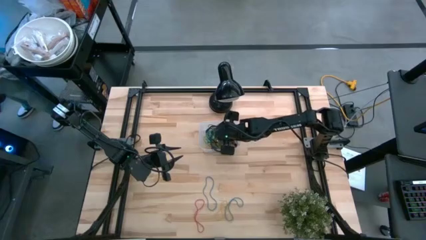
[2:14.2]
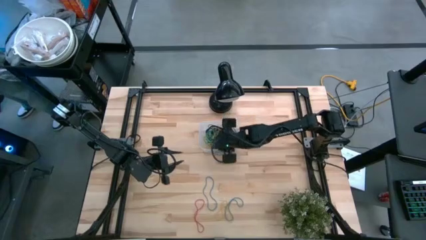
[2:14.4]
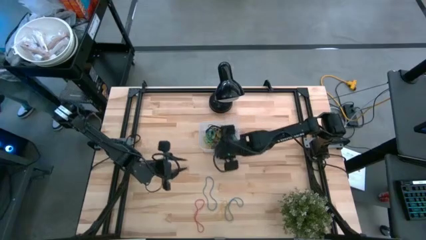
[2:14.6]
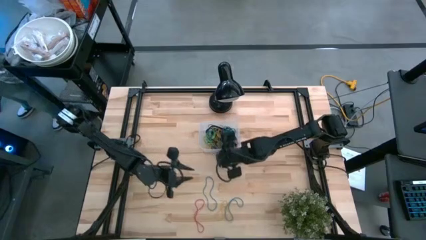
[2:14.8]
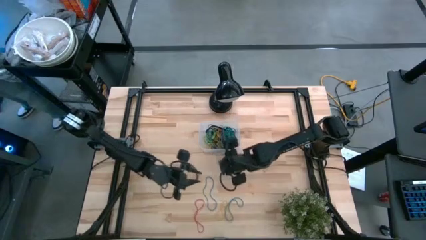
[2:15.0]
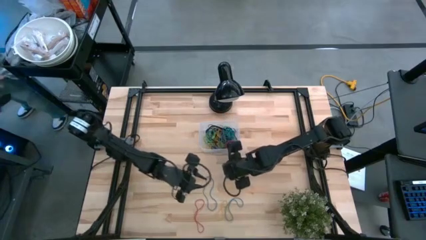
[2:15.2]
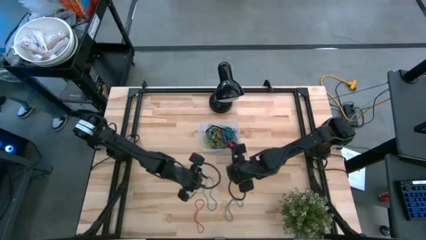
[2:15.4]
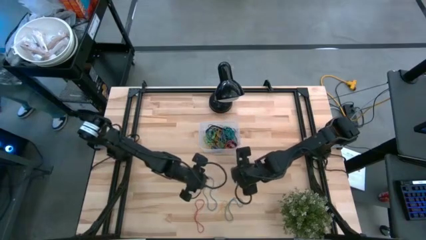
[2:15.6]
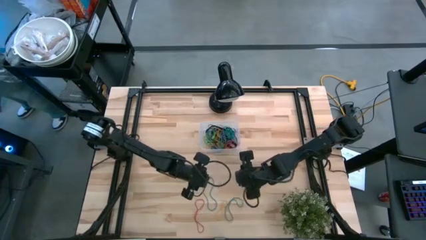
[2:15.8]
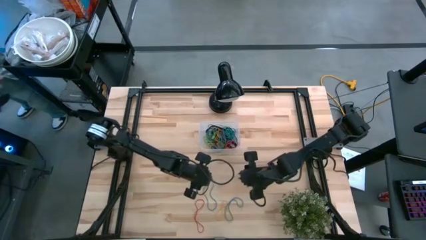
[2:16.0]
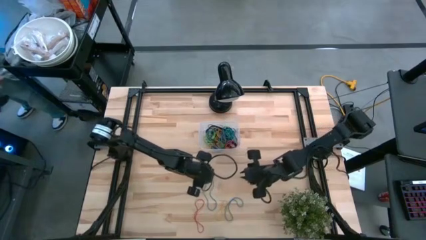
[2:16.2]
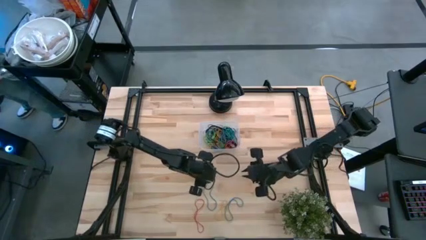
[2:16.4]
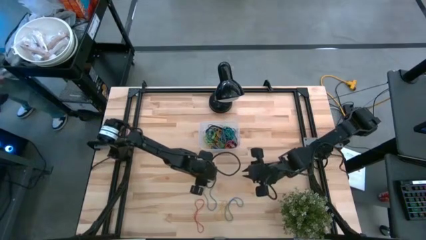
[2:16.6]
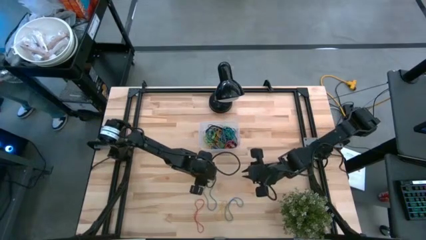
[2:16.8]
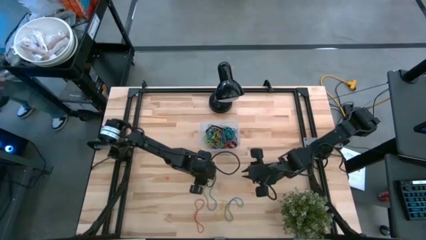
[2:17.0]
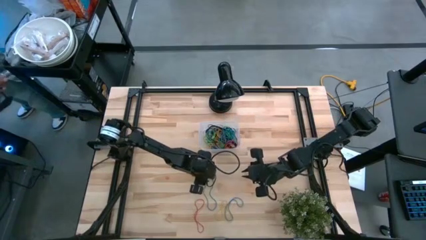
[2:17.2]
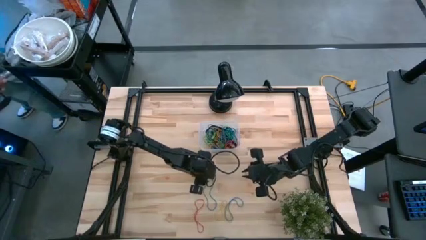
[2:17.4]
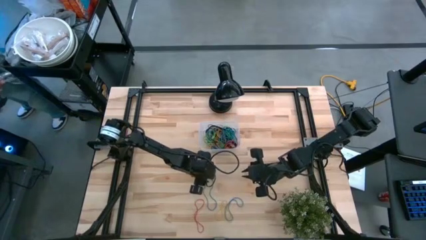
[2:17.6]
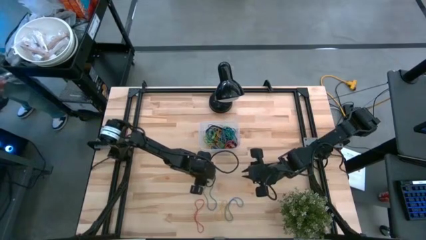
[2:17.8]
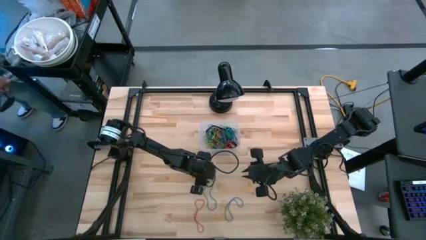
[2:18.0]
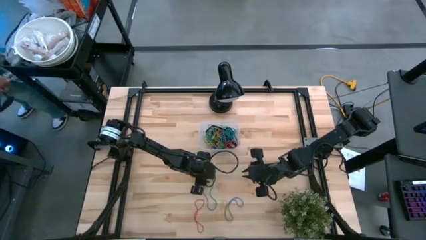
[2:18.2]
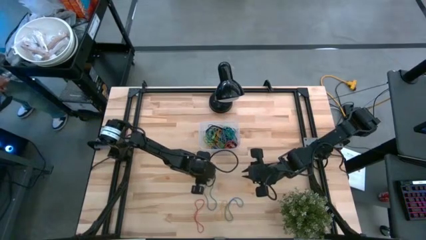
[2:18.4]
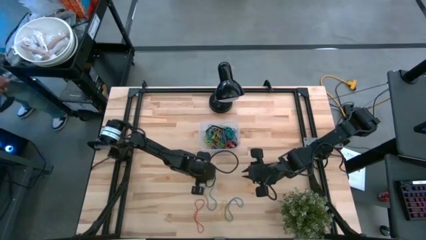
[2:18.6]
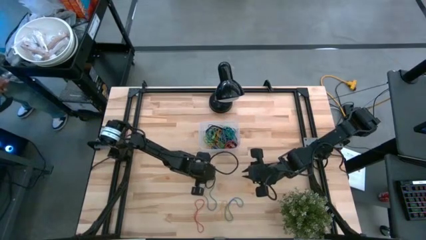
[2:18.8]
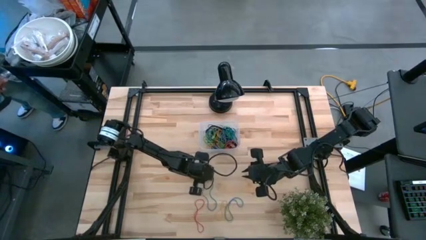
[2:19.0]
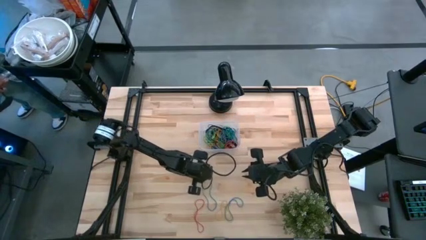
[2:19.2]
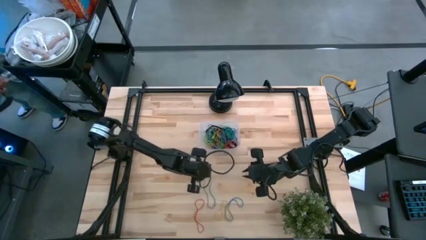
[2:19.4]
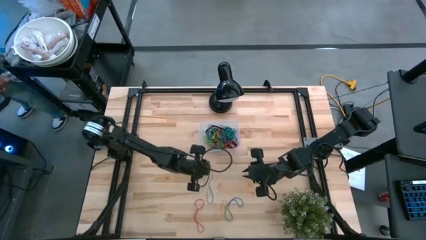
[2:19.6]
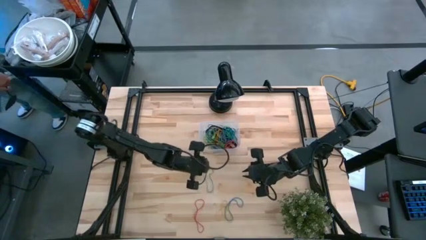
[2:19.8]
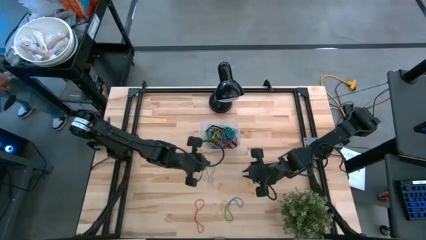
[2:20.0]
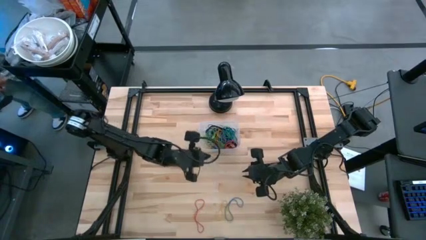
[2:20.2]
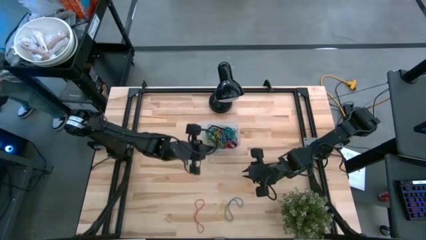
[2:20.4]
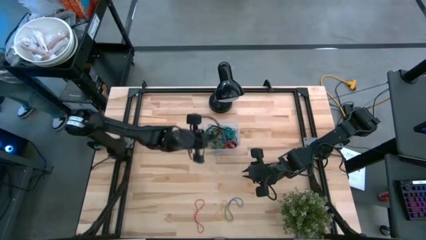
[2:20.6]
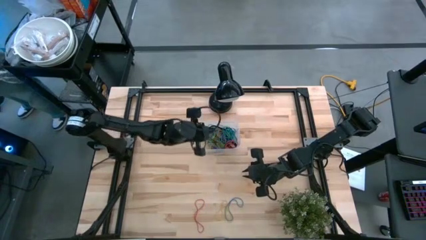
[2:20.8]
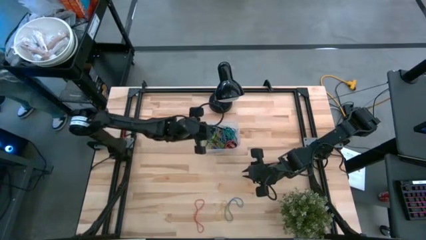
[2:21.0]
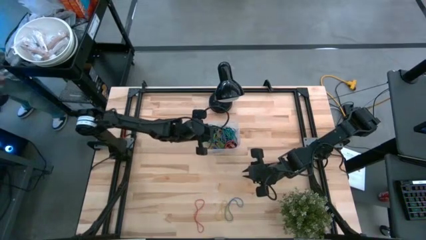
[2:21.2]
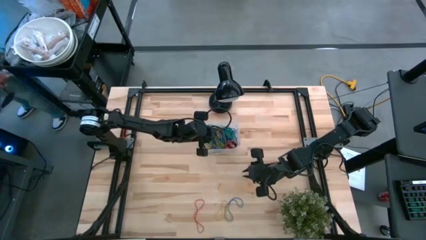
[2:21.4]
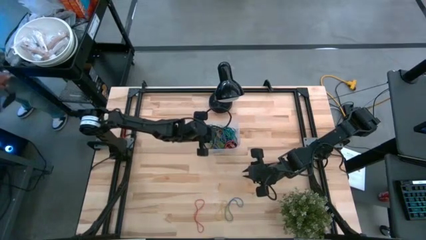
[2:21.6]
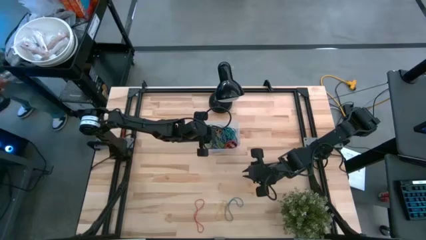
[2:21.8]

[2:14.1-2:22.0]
Task: Pick and place rubber bands into bin
Put the blue rubber band into the transparent bin

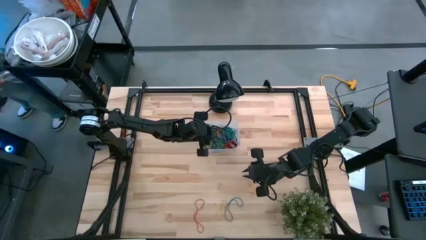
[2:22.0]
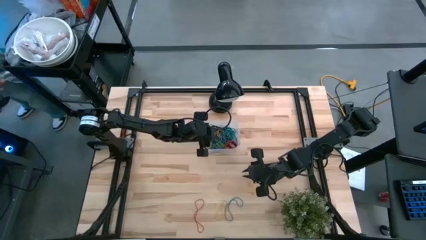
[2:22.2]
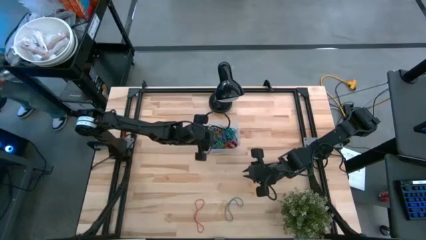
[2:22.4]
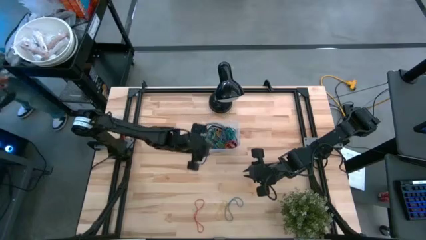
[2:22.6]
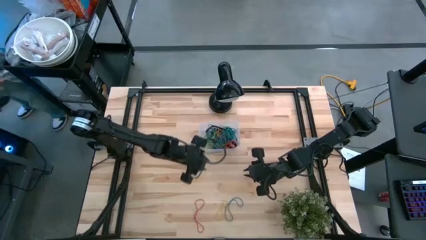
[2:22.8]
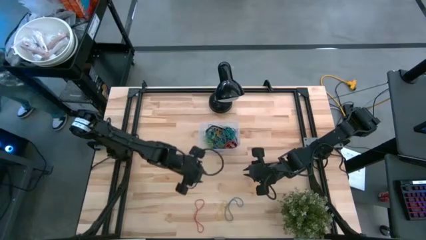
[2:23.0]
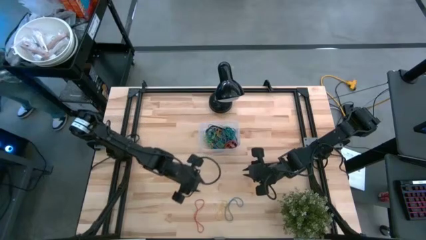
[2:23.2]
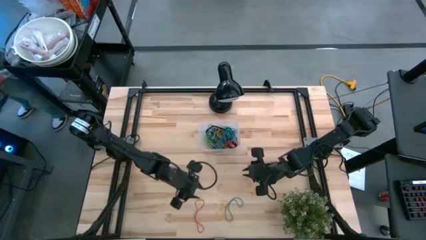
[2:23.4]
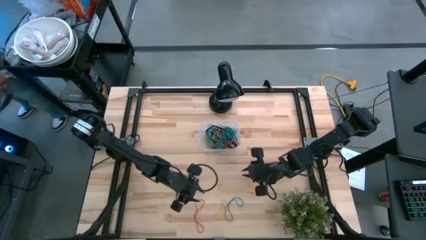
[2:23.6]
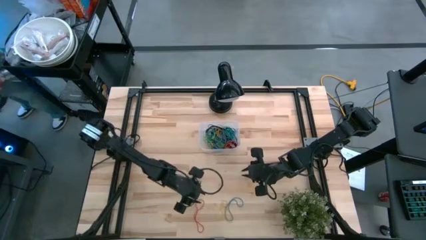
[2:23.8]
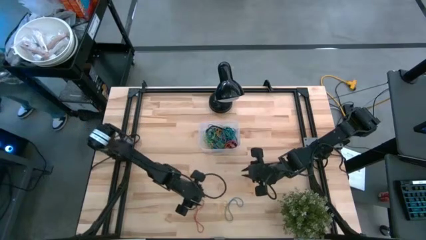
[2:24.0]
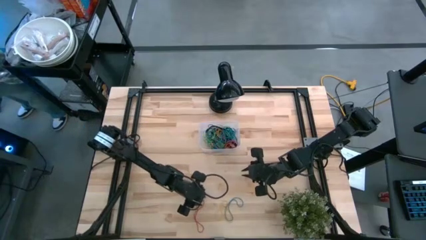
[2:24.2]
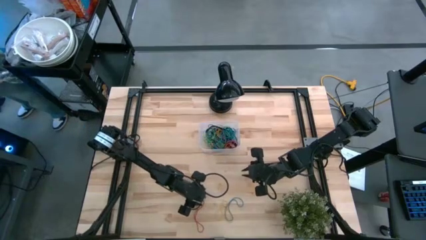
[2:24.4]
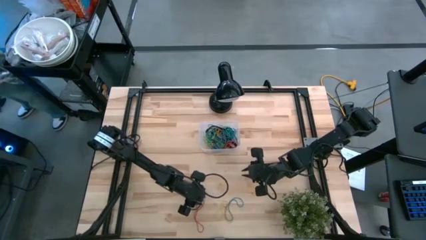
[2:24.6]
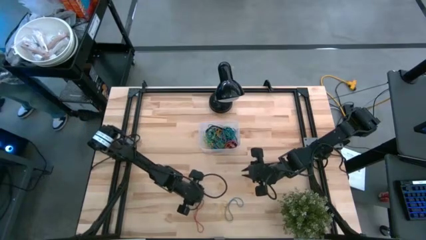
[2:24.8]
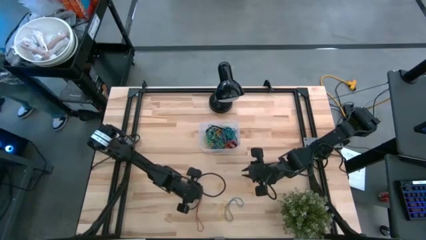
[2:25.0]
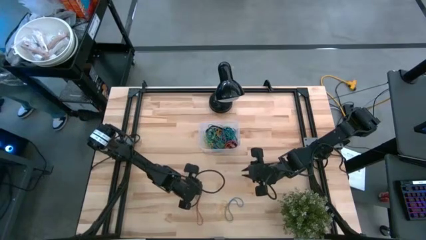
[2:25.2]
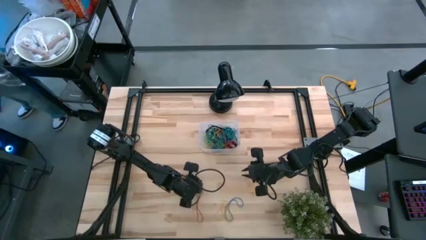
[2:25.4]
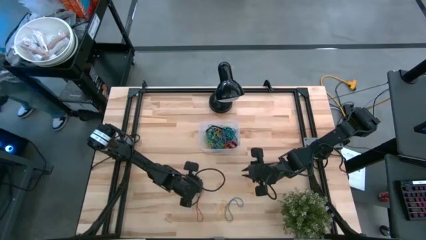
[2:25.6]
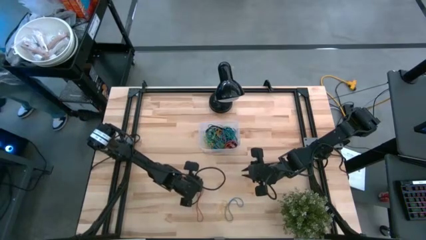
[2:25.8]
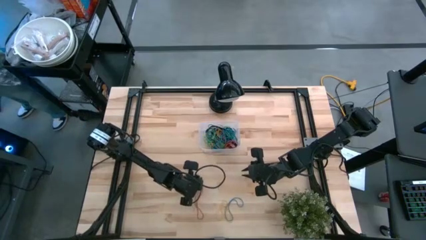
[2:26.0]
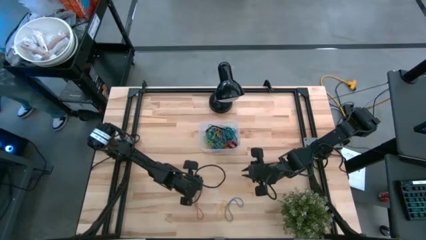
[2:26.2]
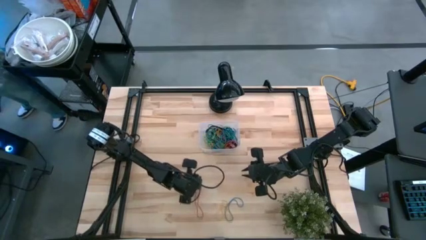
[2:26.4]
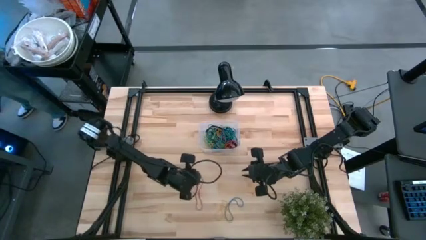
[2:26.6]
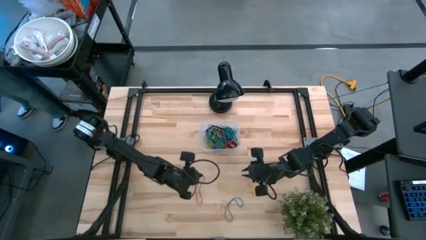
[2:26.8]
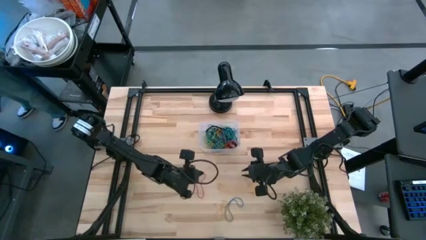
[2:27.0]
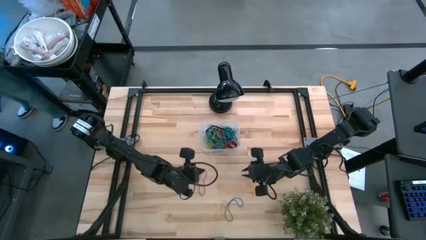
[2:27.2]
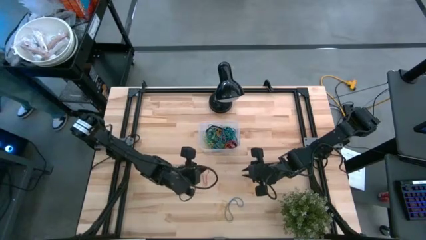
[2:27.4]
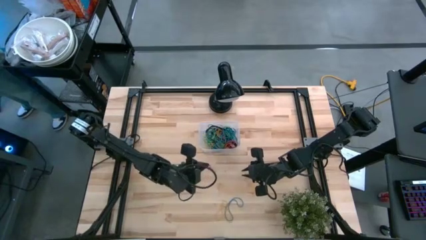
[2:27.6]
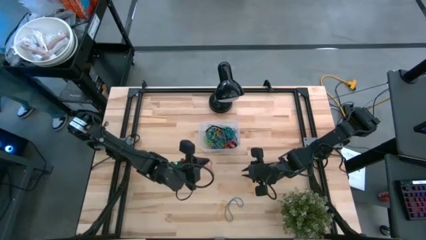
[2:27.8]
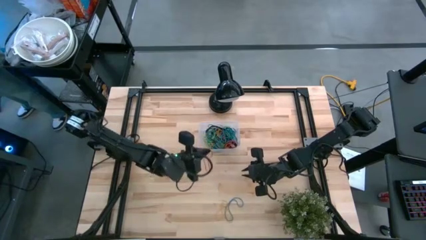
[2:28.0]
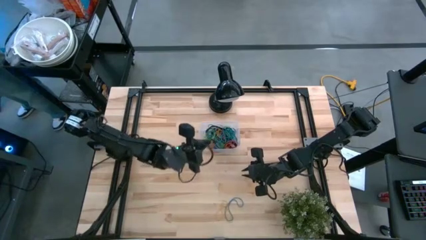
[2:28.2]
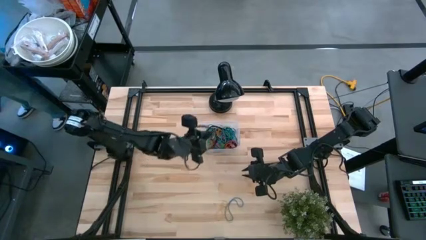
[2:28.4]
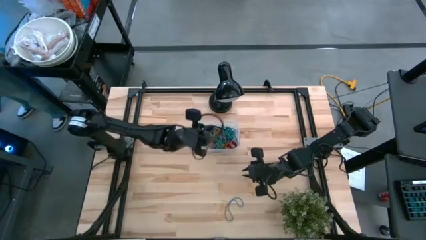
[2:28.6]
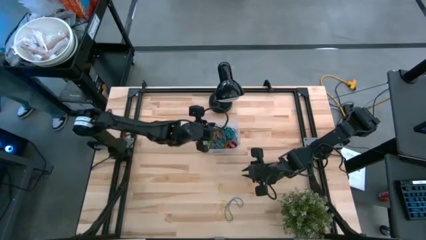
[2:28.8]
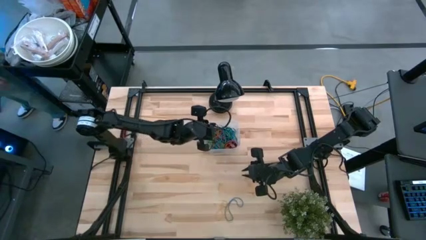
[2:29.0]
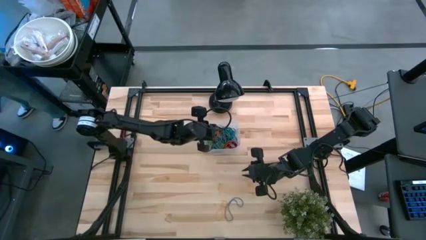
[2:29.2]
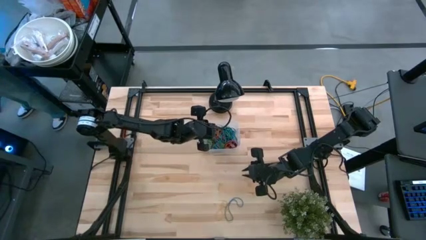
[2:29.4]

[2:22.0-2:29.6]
Put the red rubber band into the transparent bin
